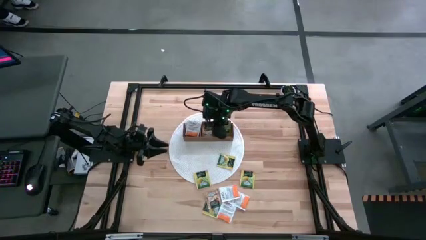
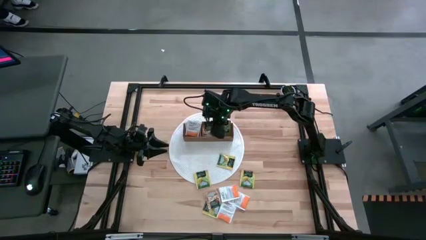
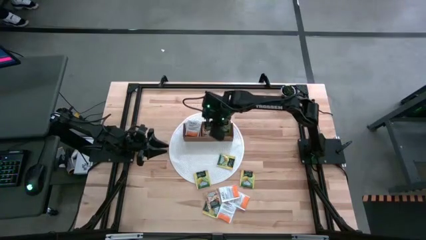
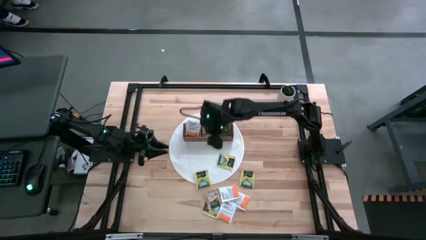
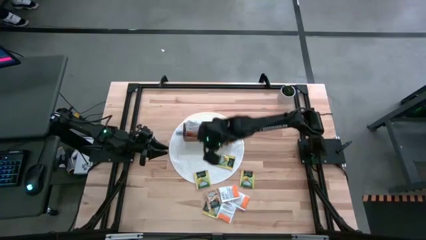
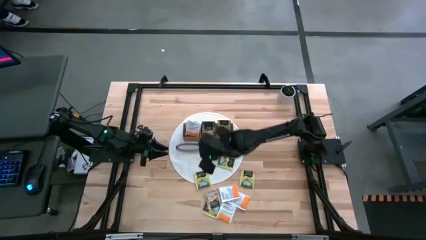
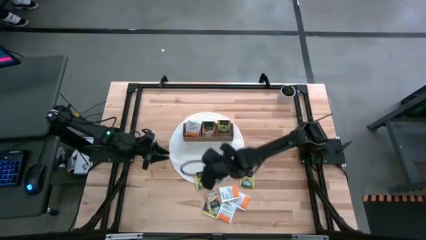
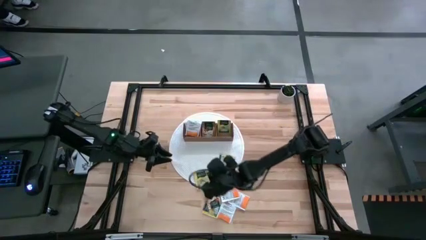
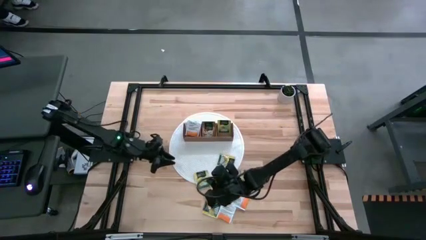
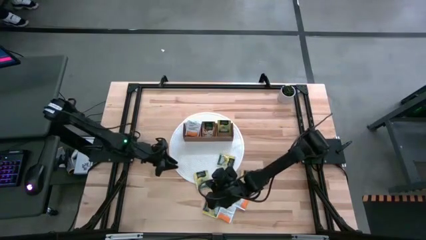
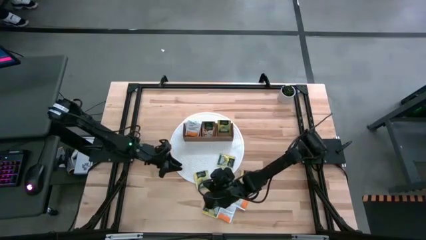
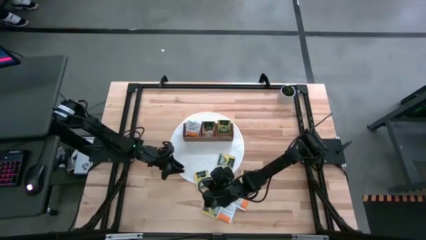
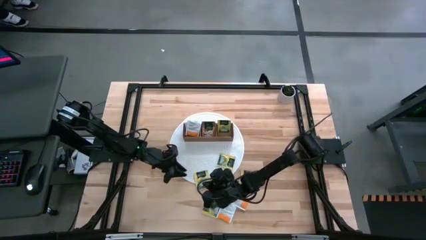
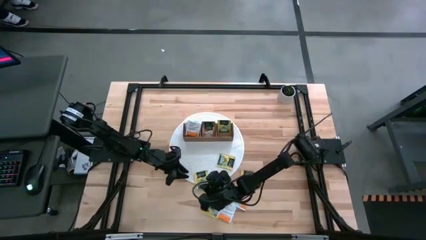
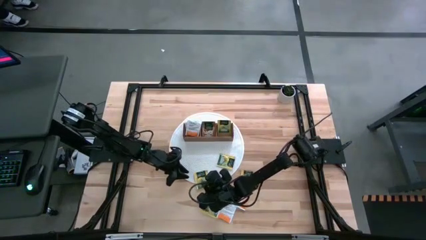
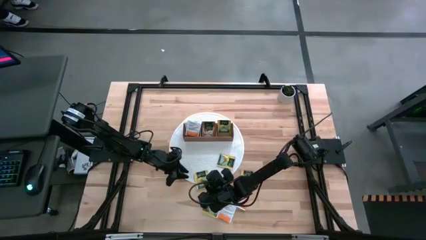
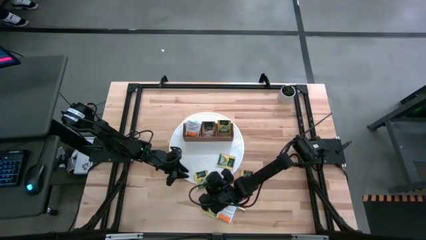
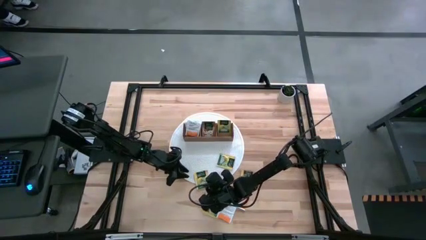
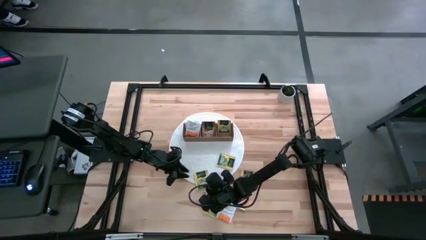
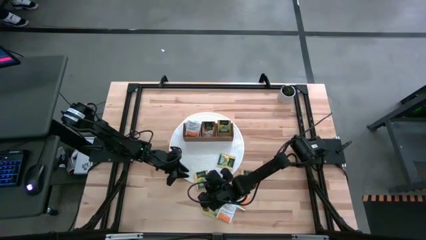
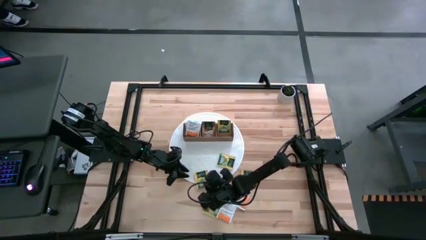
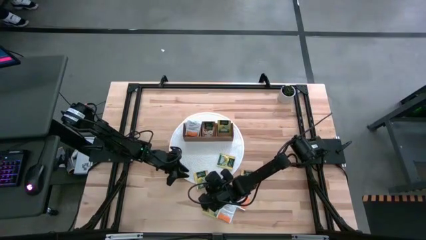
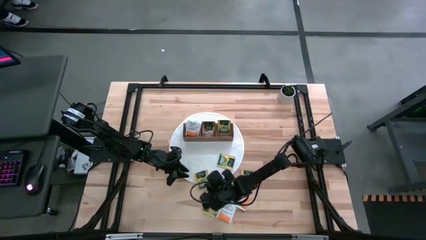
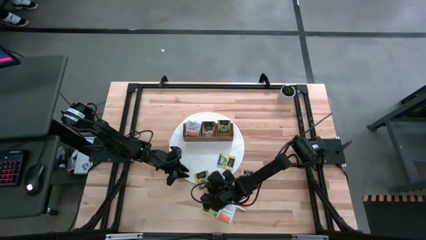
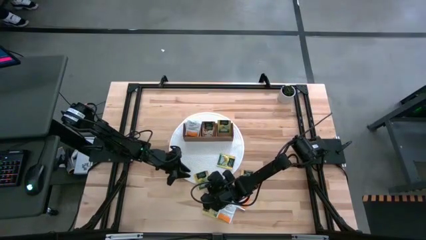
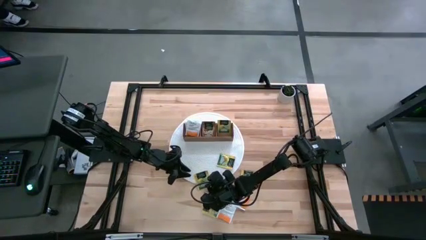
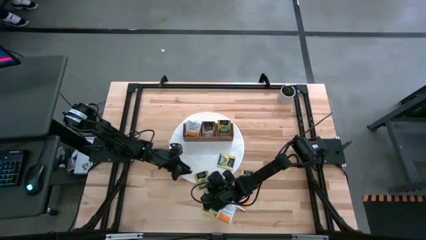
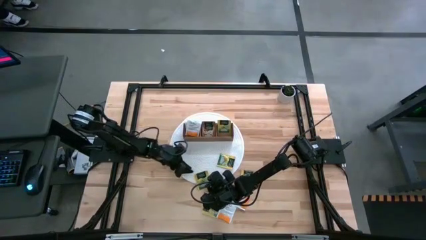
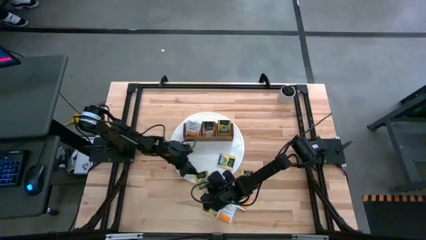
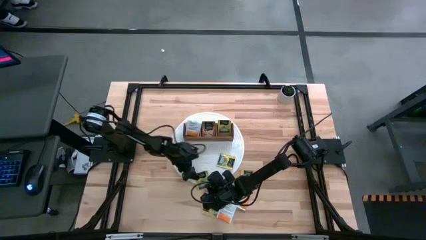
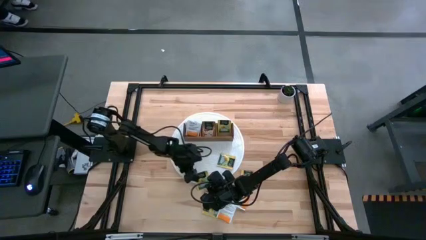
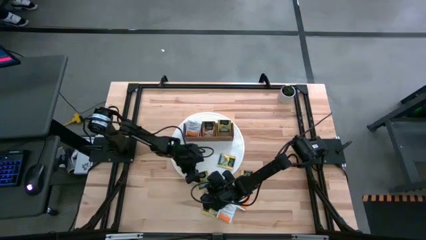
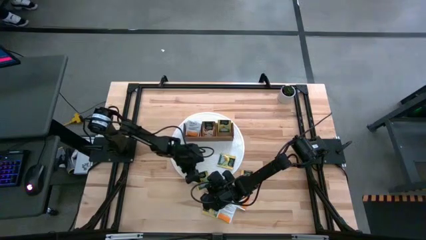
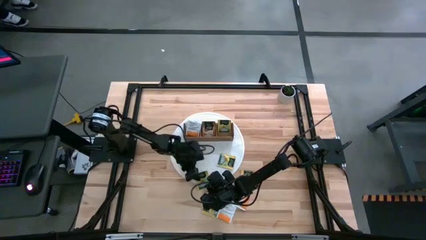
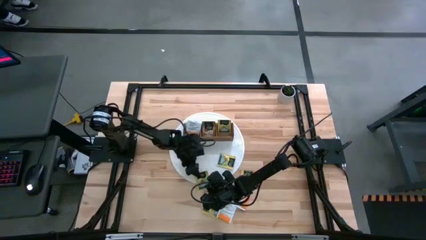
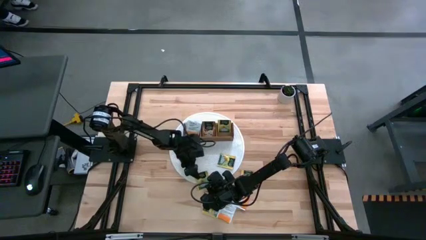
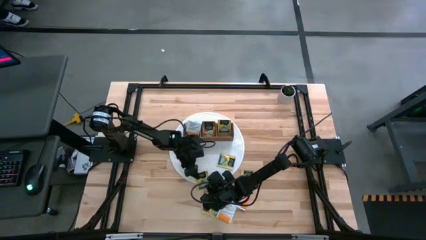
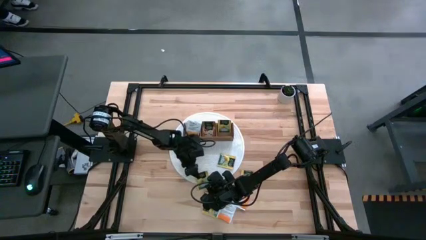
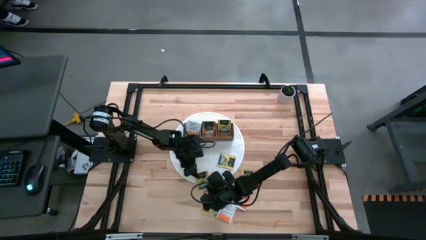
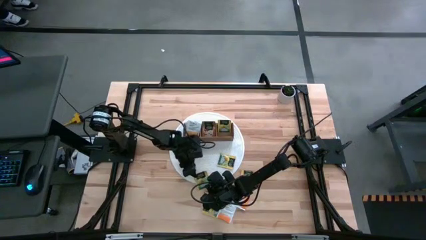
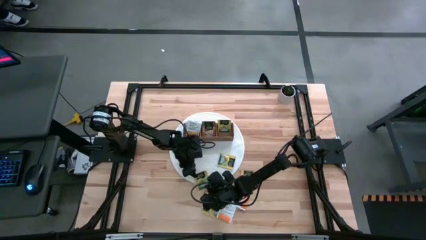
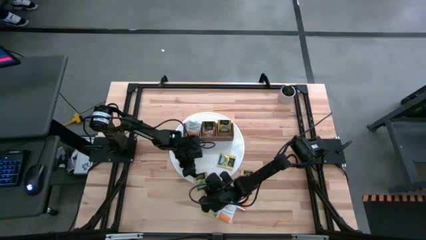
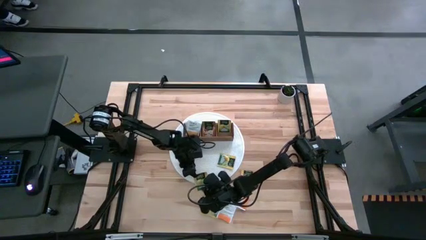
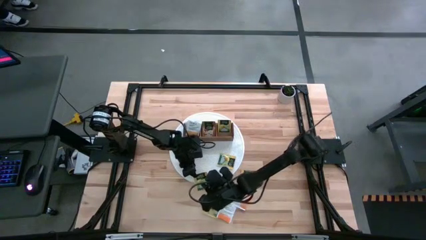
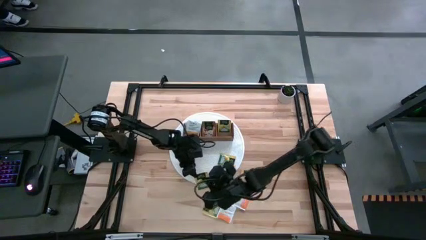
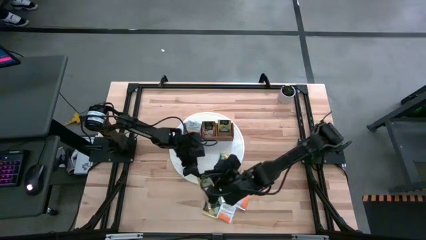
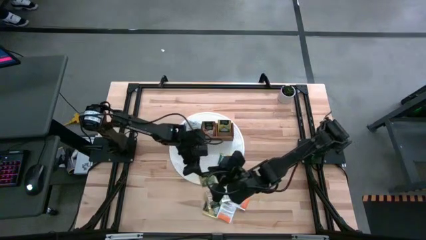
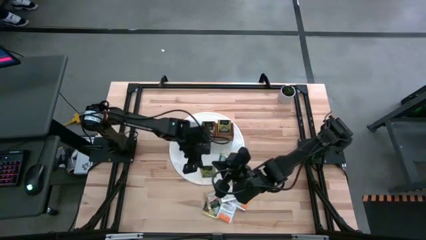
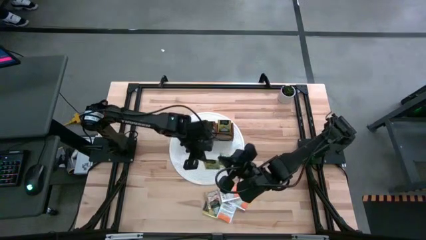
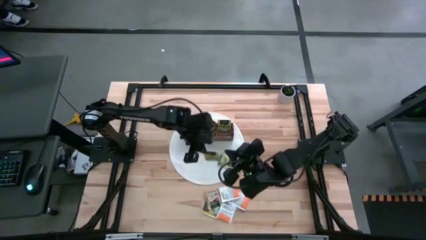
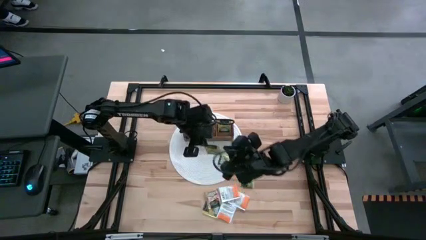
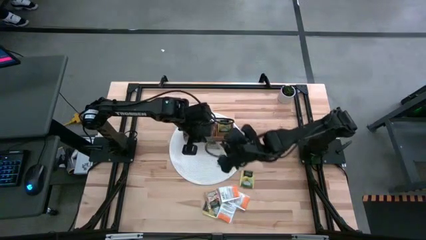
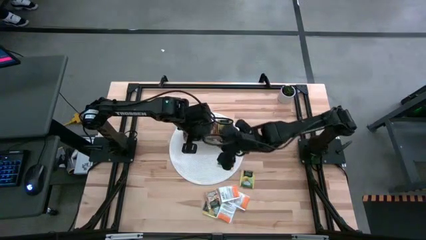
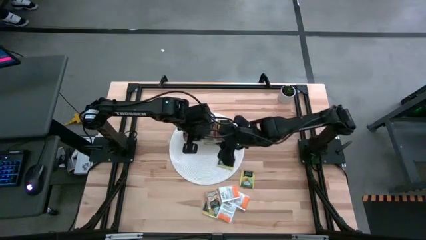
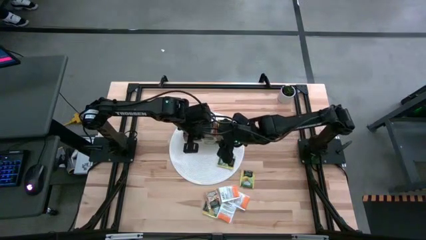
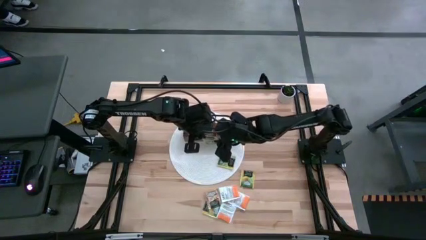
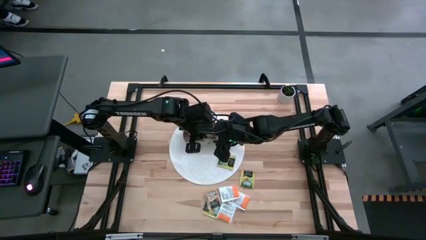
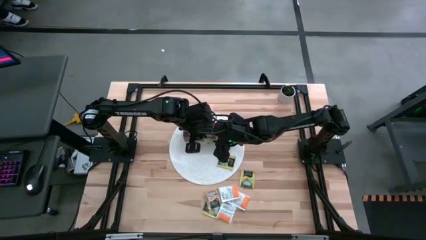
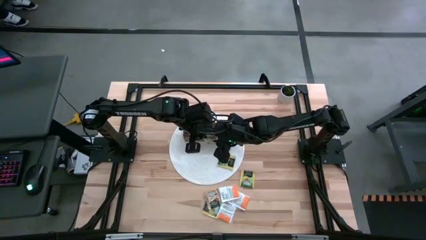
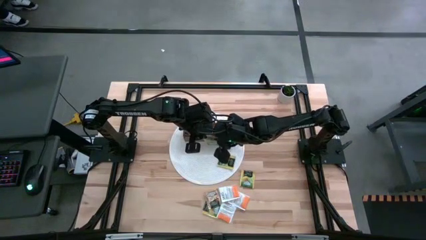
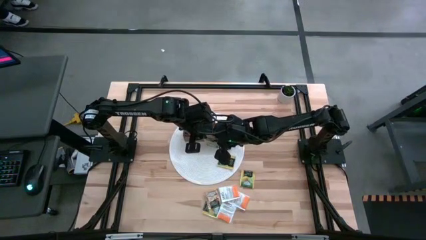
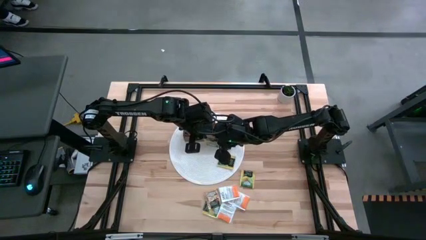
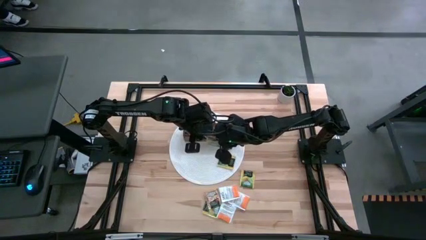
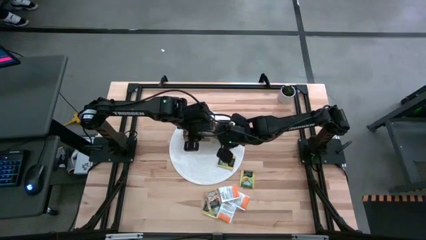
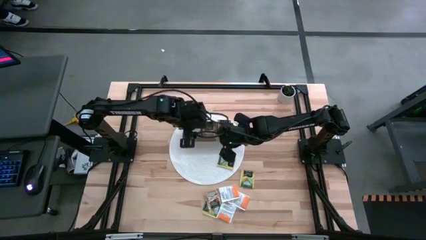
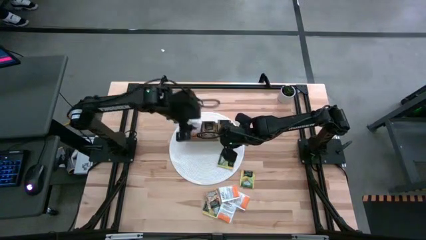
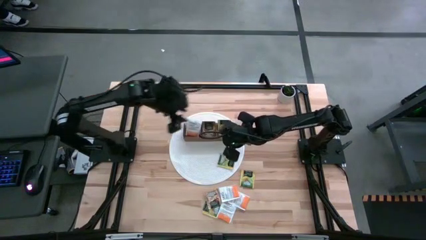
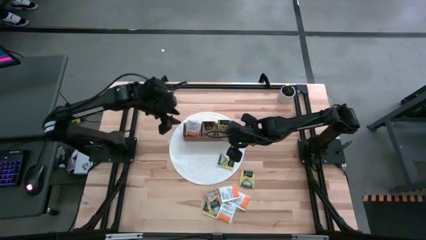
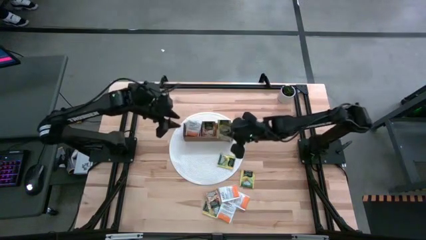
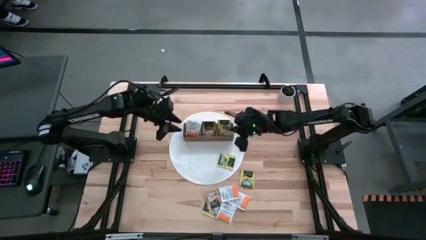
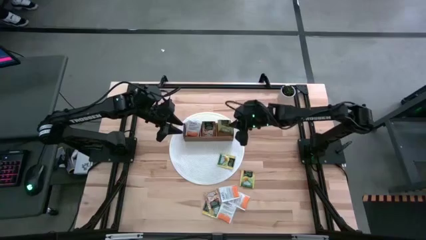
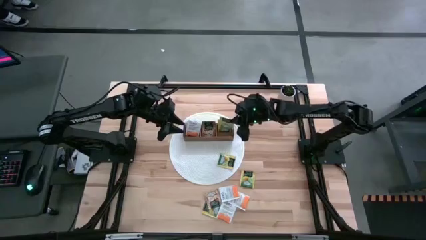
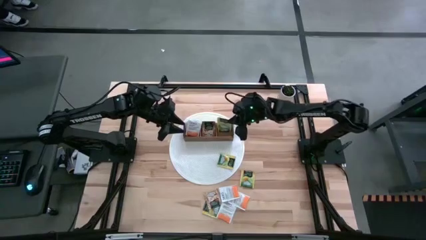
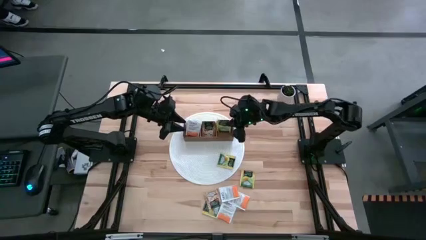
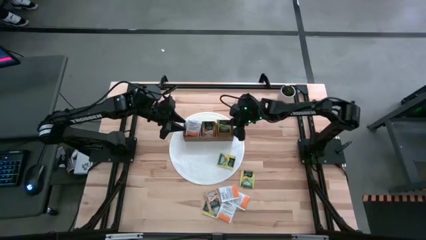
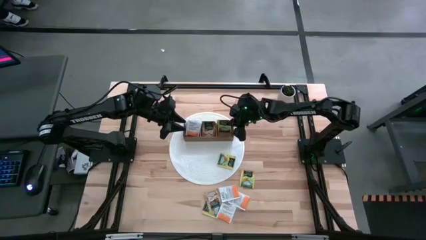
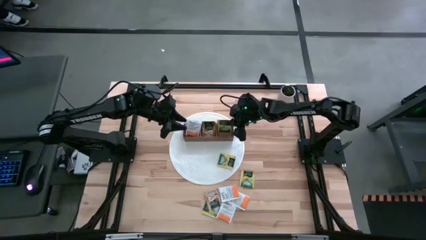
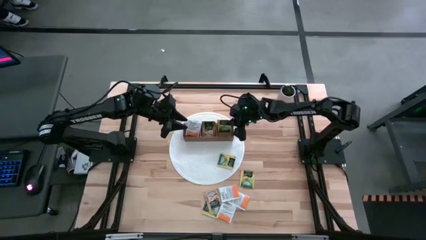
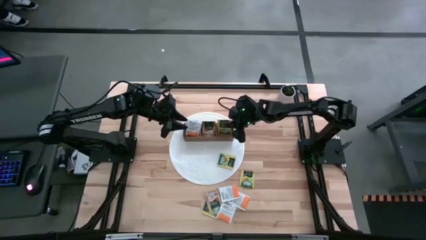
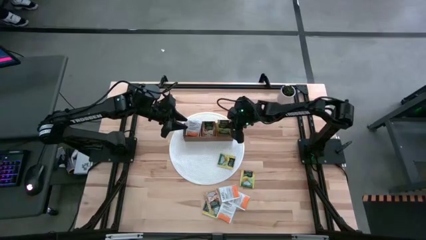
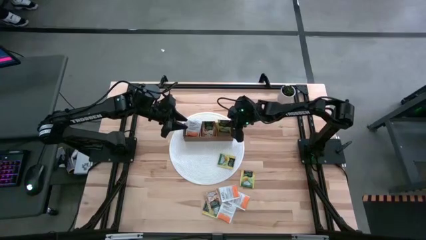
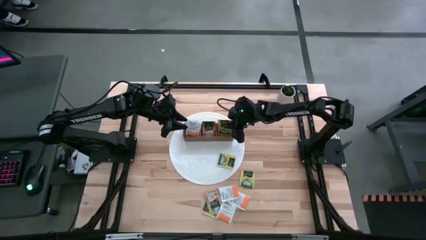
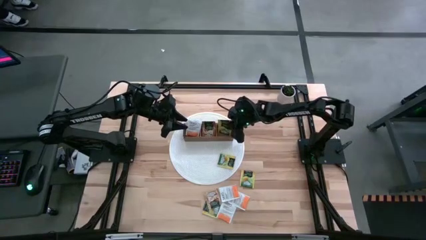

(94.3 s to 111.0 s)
Task: Pick & Place Tea
Put the yellow tea bag into the right section of the wooden organizer
